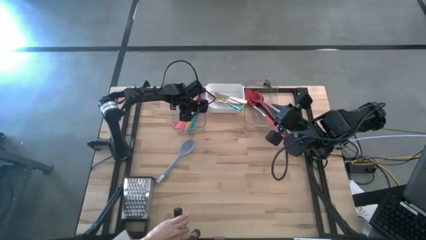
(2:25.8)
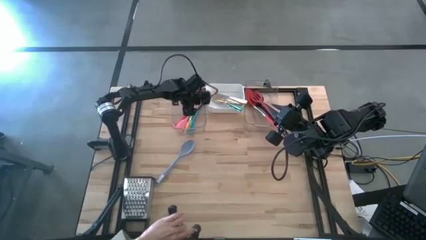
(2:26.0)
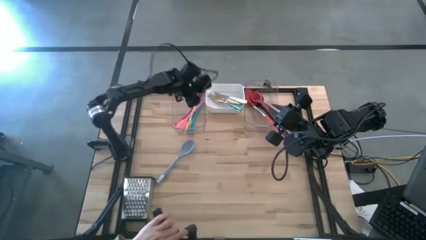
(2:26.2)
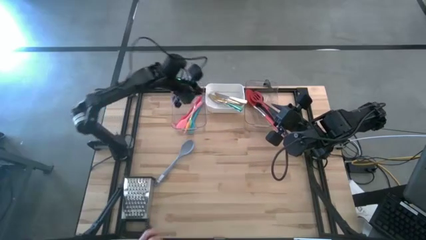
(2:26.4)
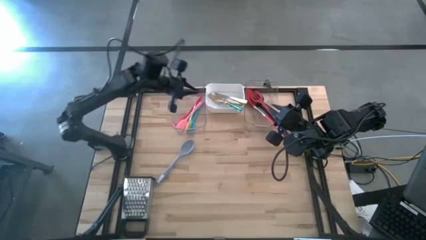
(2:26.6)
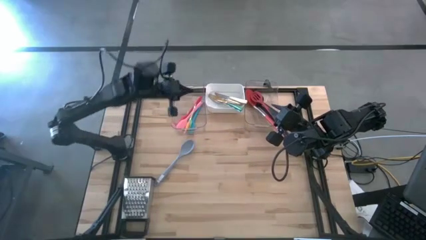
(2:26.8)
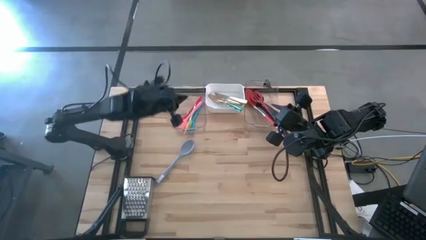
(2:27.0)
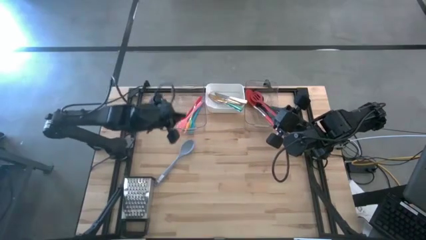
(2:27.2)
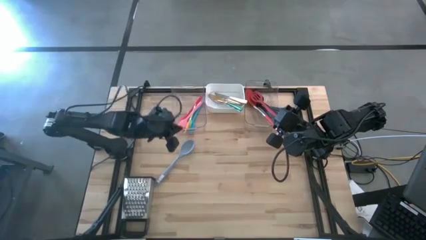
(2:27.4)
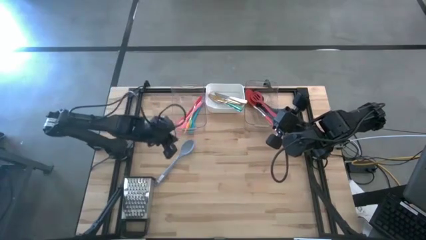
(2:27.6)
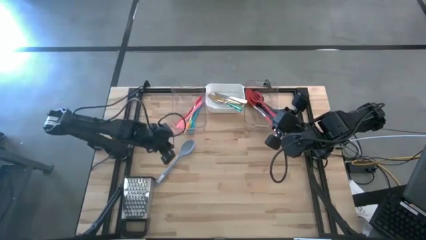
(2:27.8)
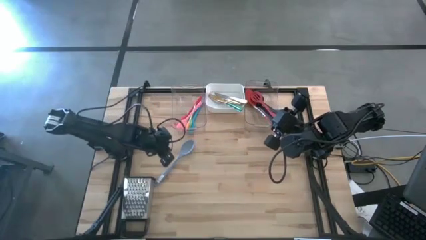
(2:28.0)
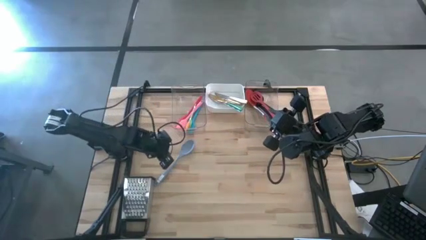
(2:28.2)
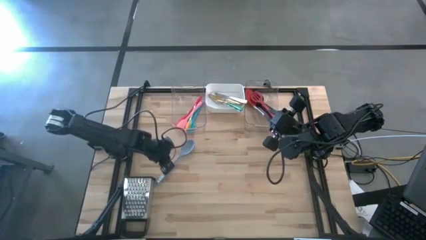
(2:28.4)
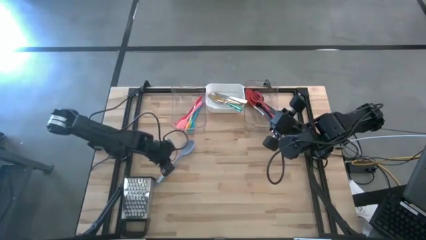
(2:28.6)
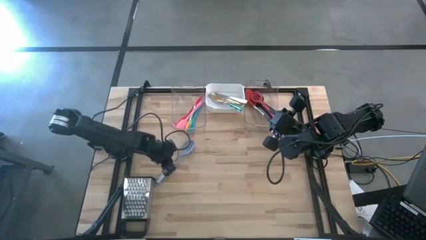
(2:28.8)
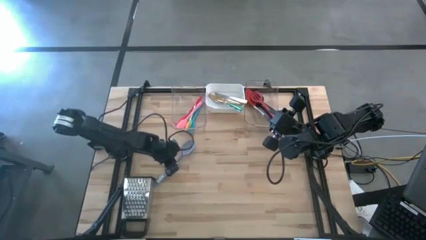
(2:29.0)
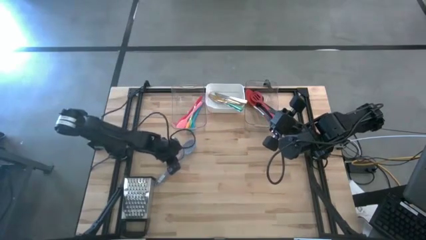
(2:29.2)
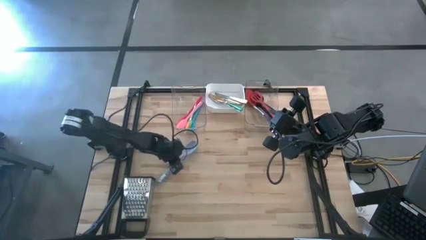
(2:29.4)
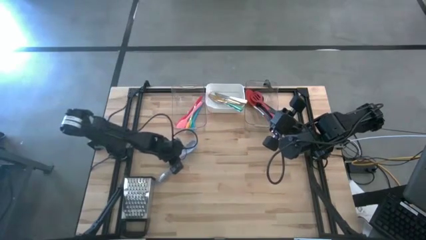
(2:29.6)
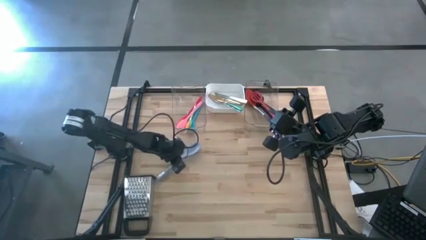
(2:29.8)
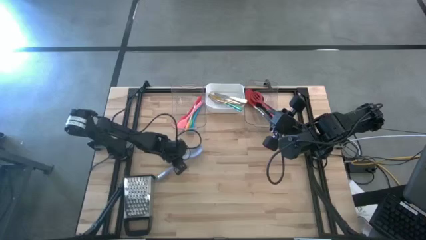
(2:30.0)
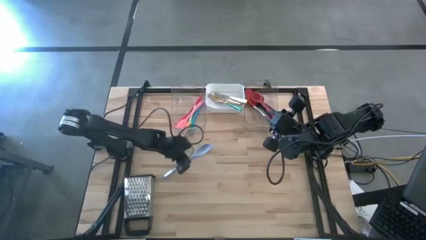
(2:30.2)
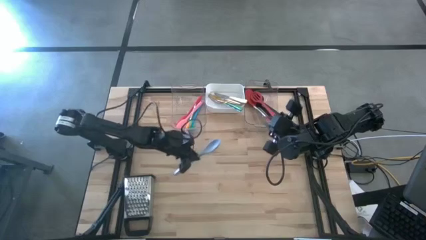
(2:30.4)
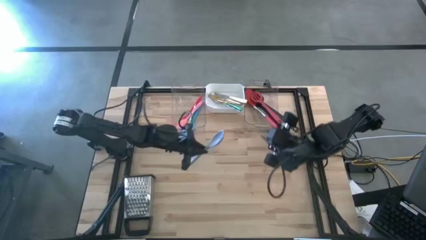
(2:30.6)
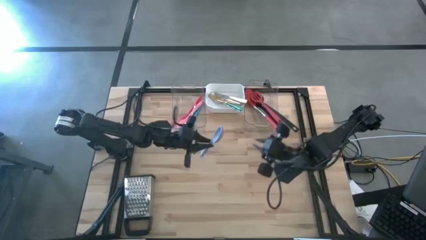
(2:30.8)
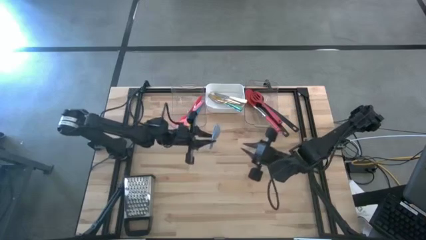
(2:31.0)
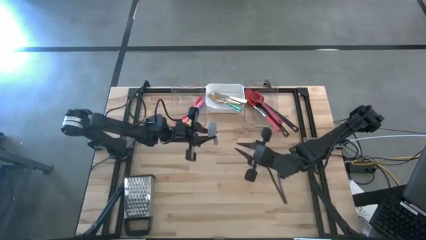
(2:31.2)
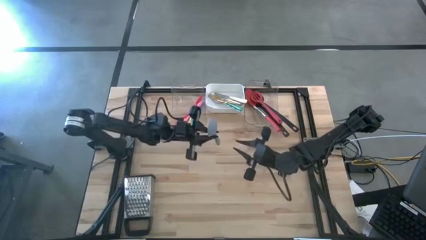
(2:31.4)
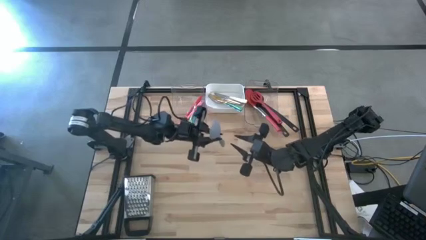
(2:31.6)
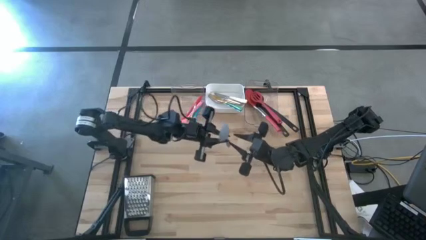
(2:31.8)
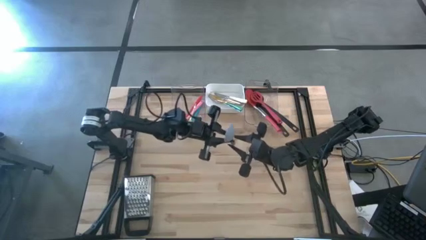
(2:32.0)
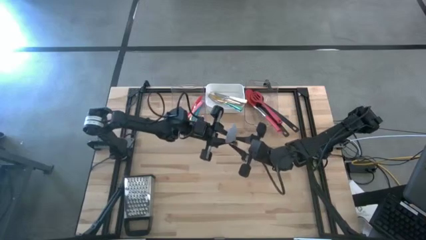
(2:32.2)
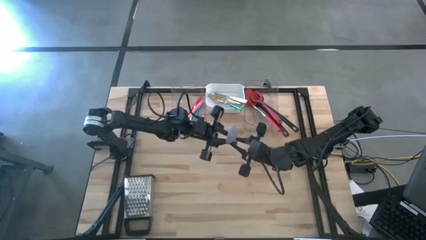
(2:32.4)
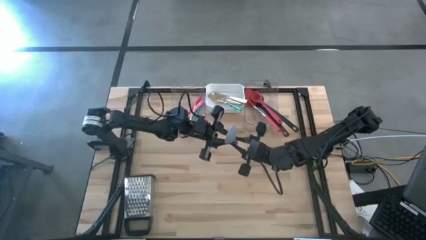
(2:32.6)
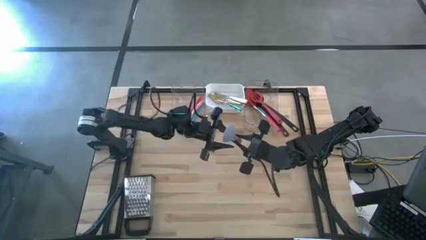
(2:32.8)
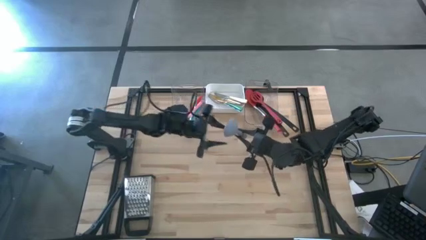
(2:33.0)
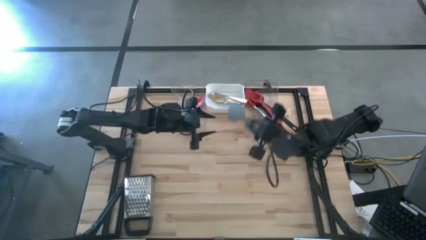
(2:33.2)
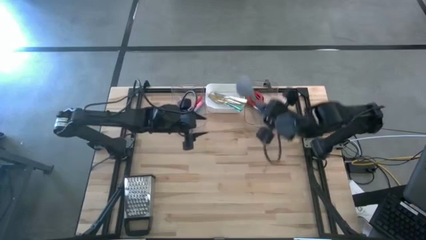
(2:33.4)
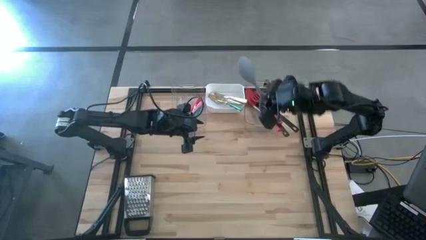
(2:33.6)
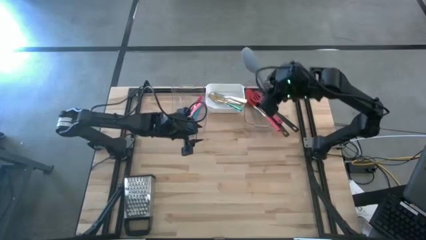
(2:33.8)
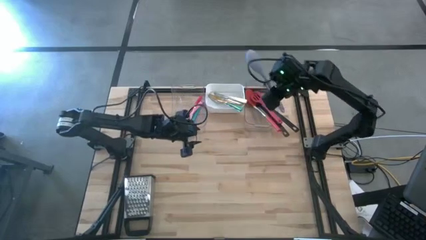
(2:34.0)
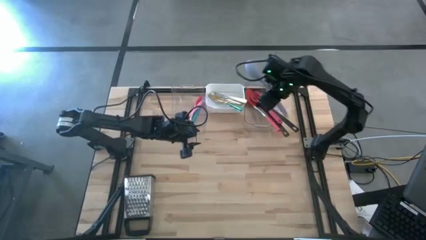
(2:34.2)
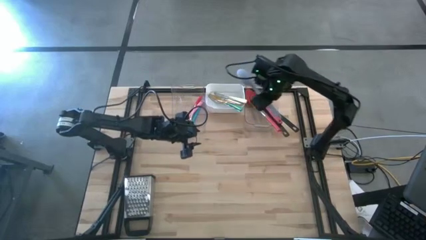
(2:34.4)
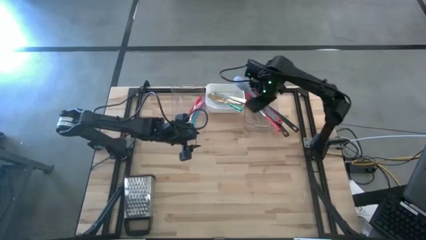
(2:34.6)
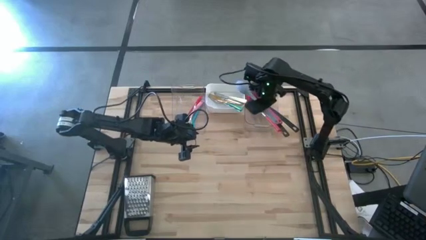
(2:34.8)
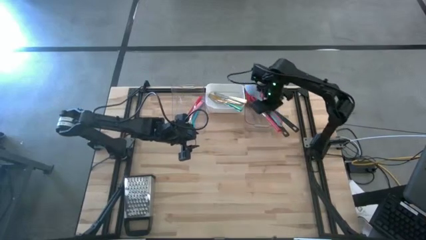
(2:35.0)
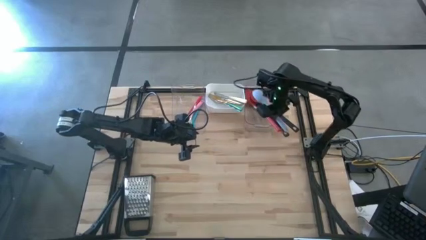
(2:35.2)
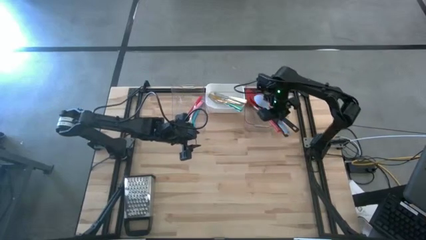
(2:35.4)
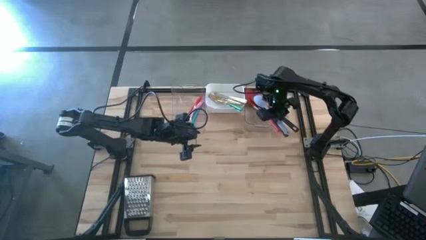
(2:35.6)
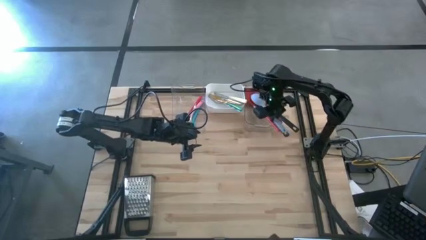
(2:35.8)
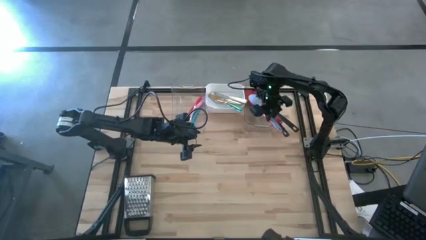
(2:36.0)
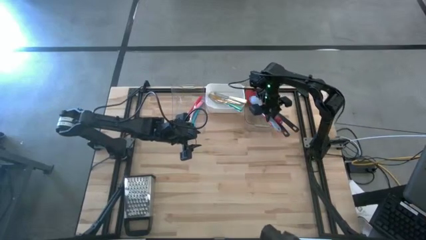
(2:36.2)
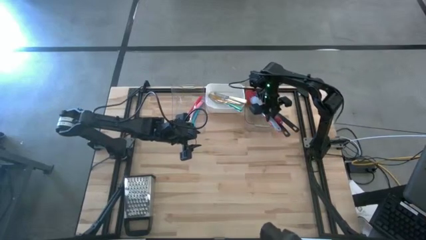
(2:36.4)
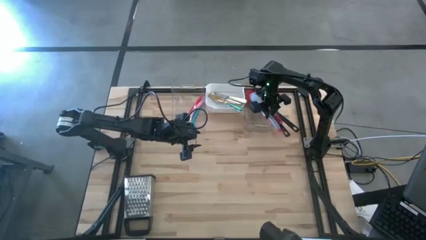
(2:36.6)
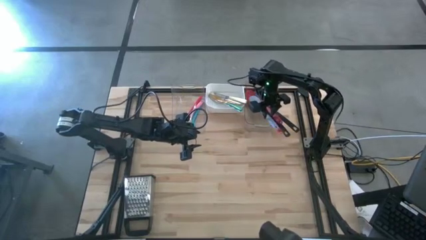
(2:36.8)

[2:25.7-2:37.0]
Task: Pick & Place Kitchen Items
Put the blue serving spoon into the right transparent bin

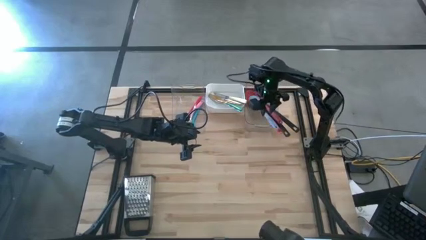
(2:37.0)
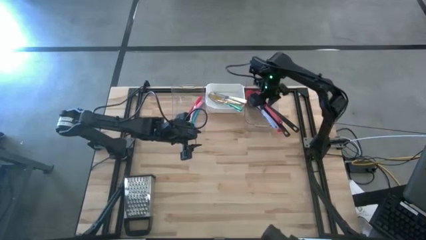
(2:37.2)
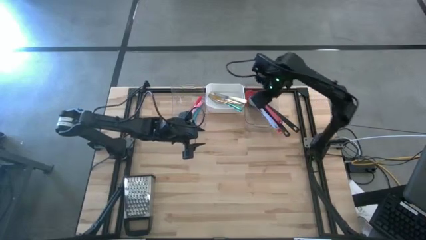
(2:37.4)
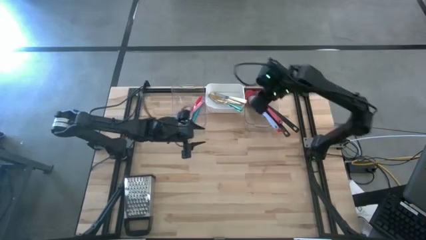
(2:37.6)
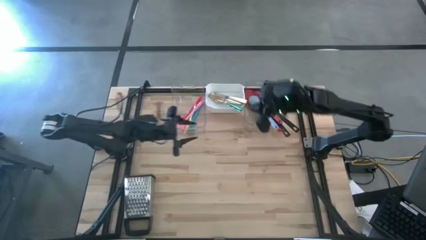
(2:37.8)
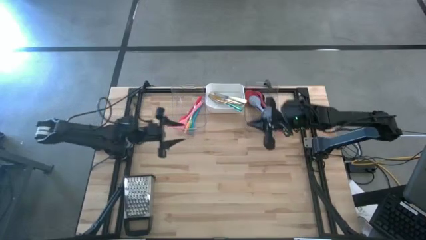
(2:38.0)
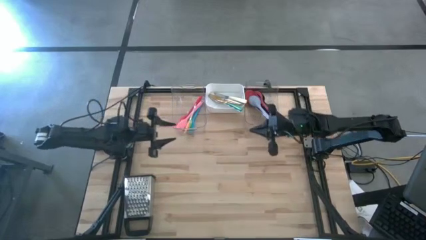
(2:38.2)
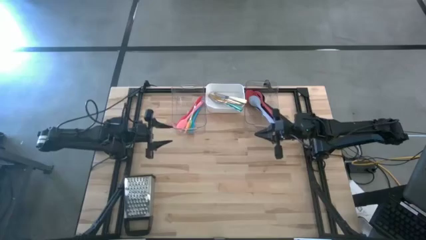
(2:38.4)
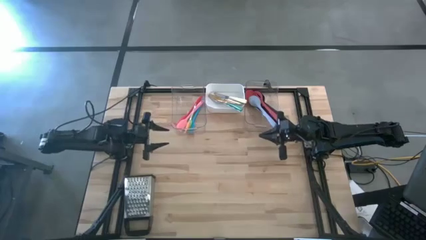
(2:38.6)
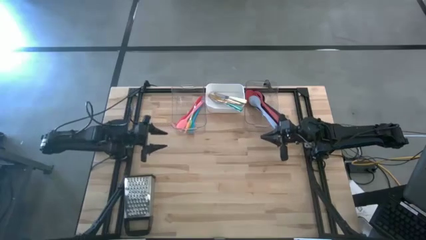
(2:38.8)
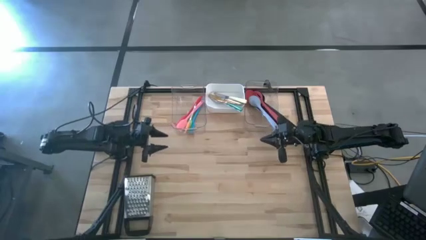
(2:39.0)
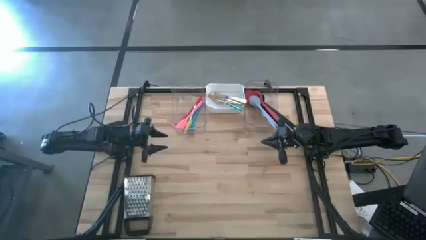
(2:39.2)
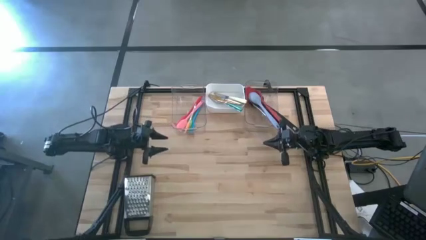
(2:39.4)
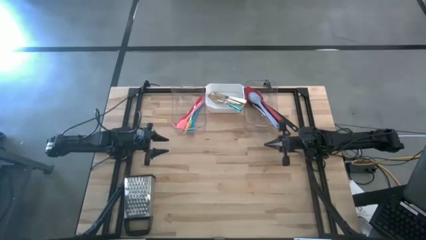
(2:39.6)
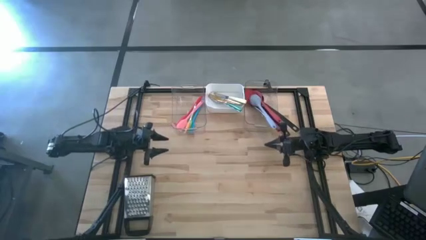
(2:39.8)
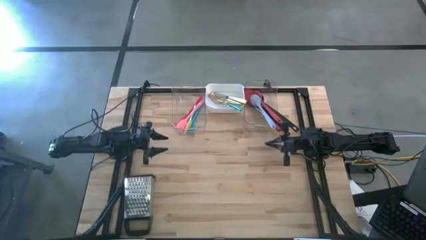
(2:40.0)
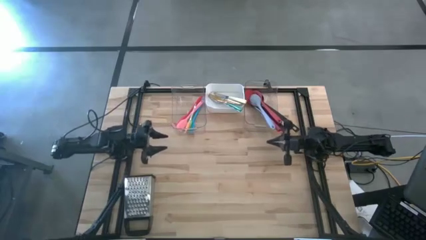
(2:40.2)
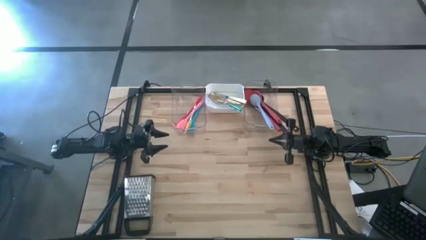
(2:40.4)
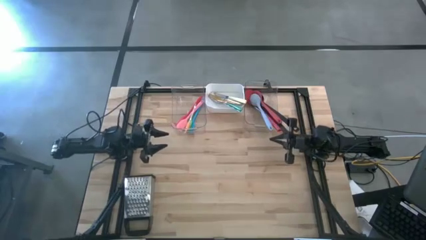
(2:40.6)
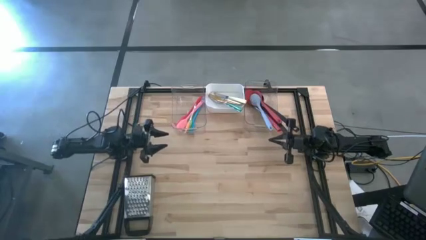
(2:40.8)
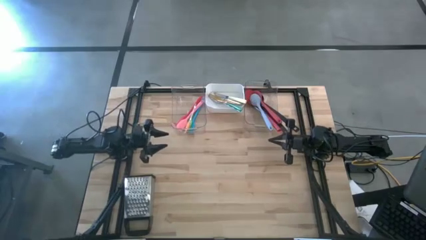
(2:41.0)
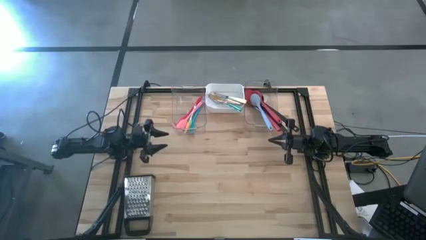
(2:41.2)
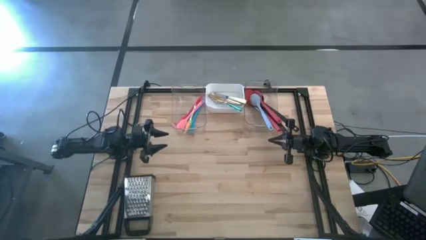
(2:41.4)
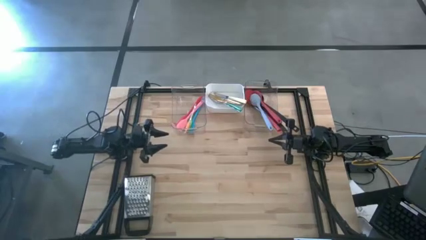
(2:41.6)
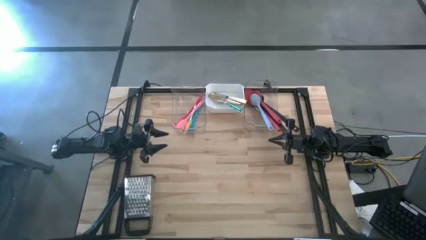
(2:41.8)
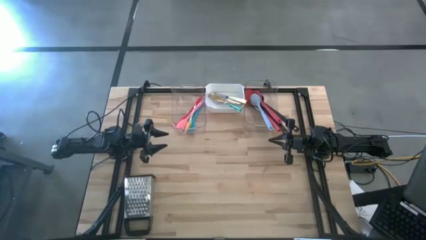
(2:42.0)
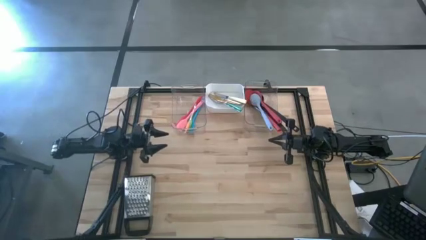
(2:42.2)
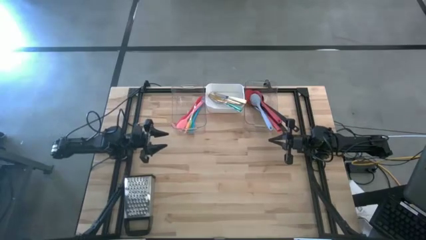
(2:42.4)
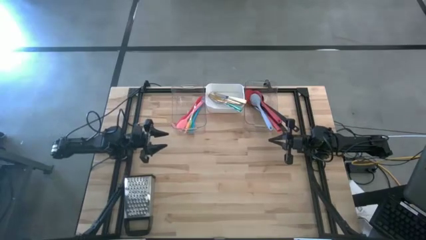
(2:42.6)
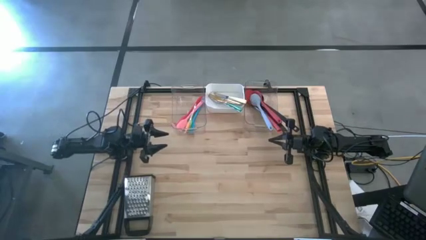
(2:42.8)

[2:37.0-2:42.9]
Return to Home Position
